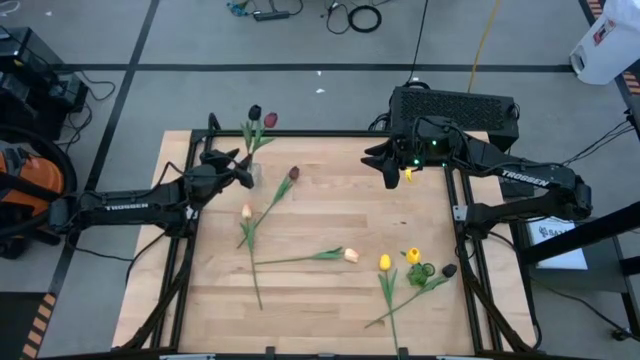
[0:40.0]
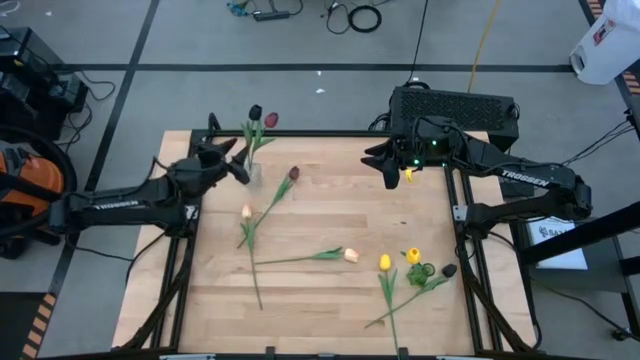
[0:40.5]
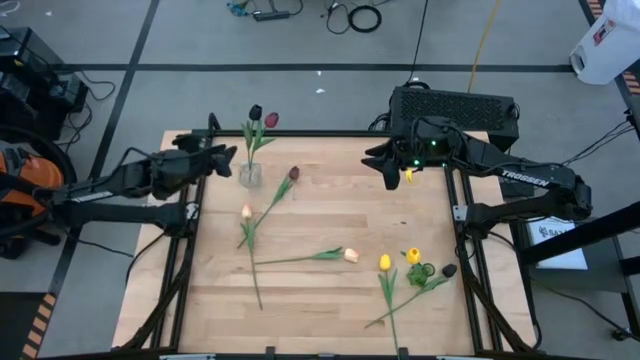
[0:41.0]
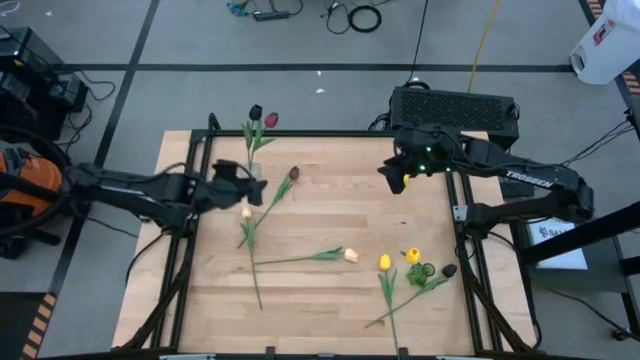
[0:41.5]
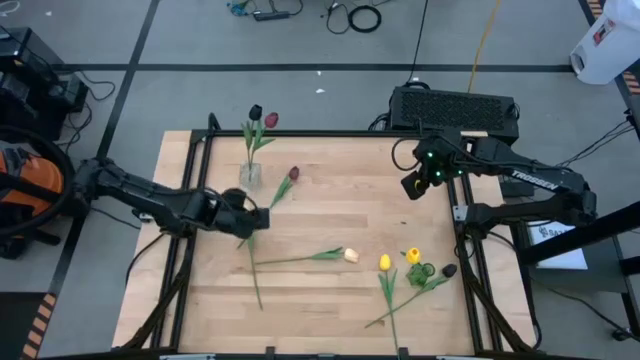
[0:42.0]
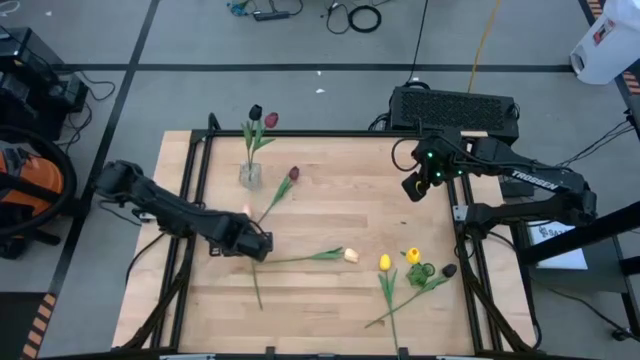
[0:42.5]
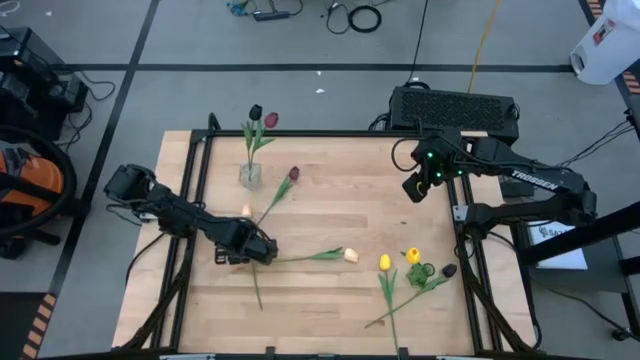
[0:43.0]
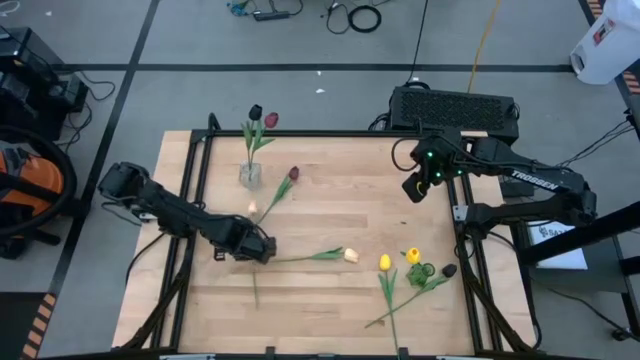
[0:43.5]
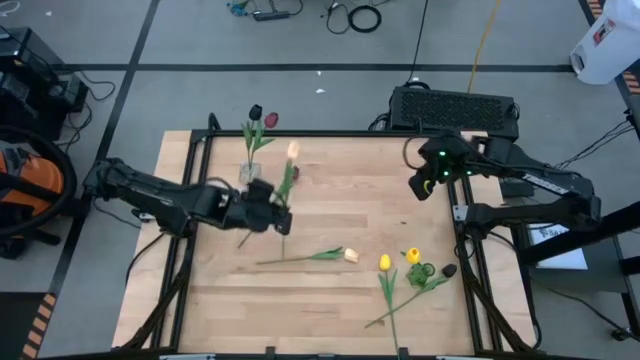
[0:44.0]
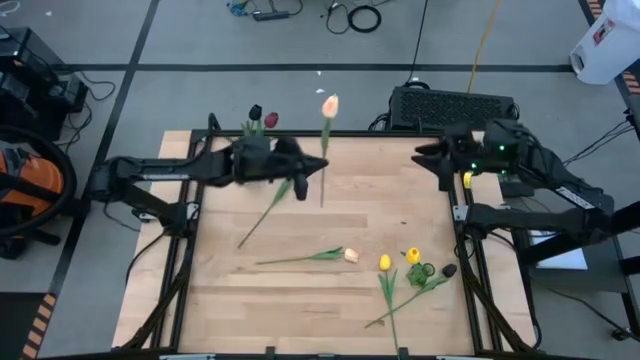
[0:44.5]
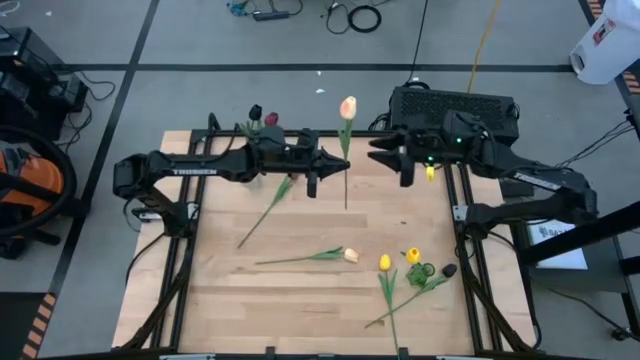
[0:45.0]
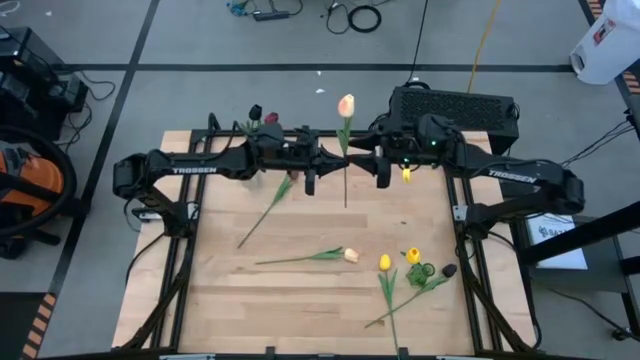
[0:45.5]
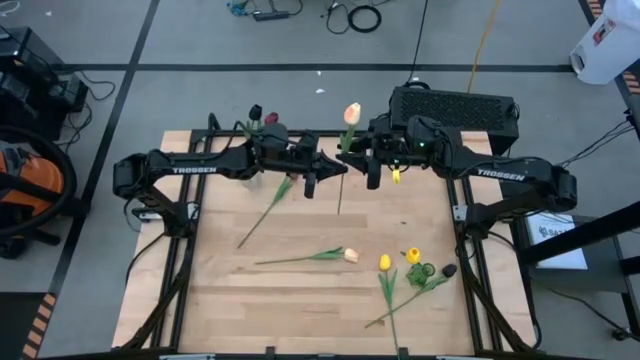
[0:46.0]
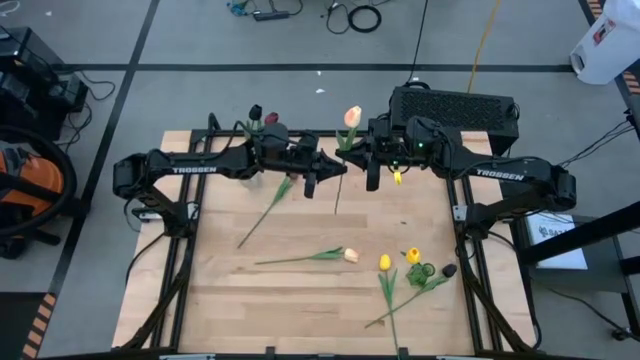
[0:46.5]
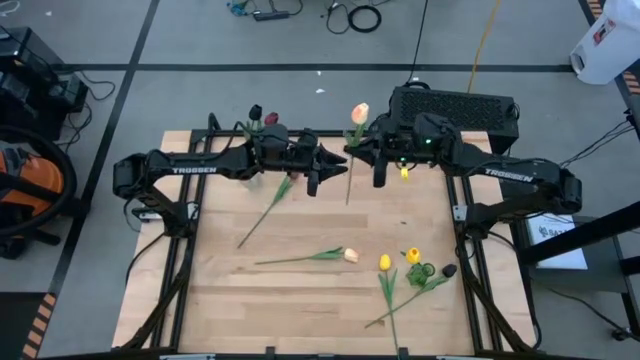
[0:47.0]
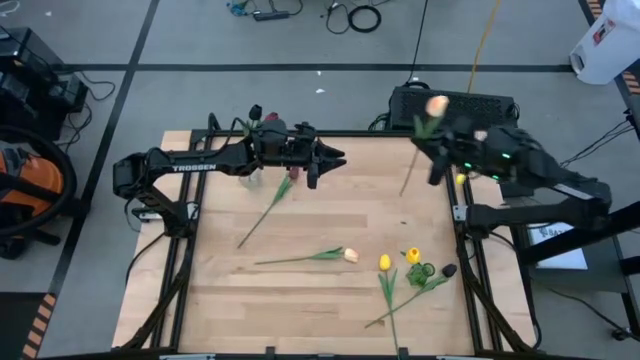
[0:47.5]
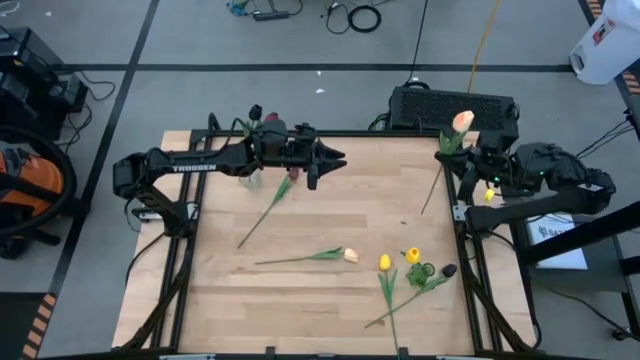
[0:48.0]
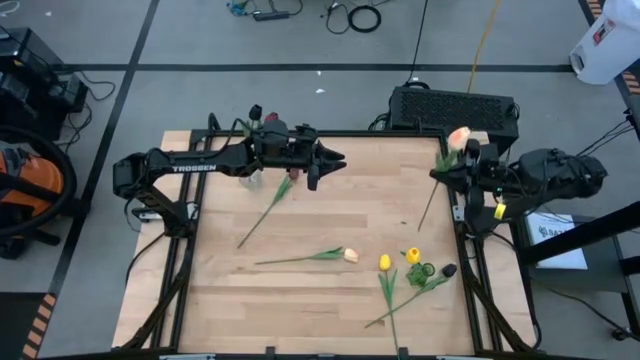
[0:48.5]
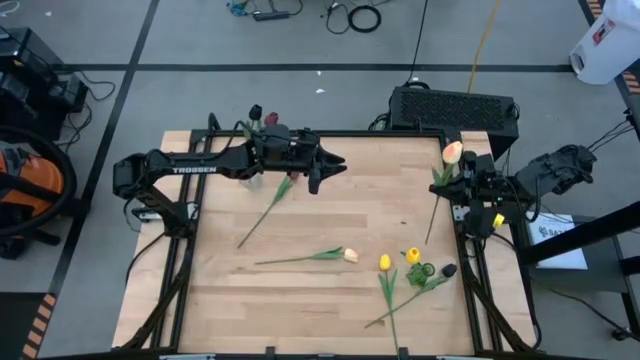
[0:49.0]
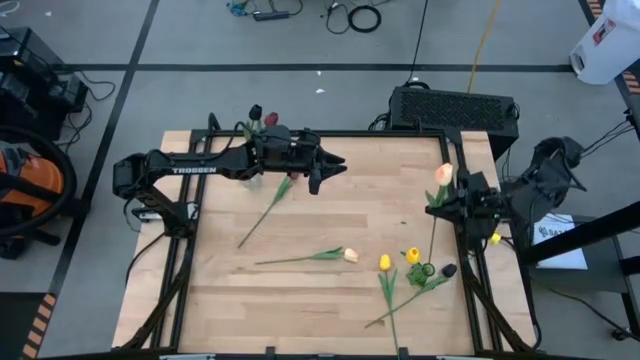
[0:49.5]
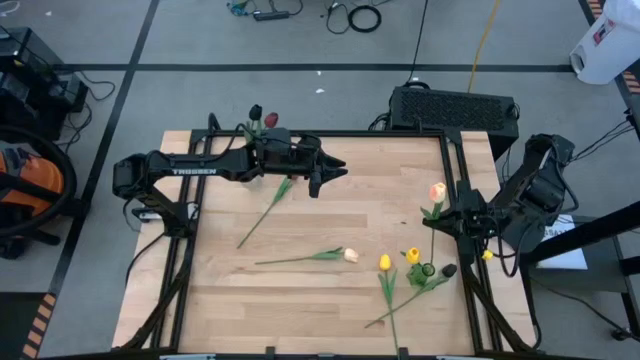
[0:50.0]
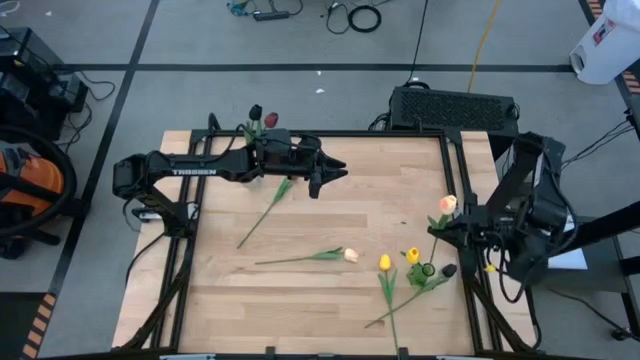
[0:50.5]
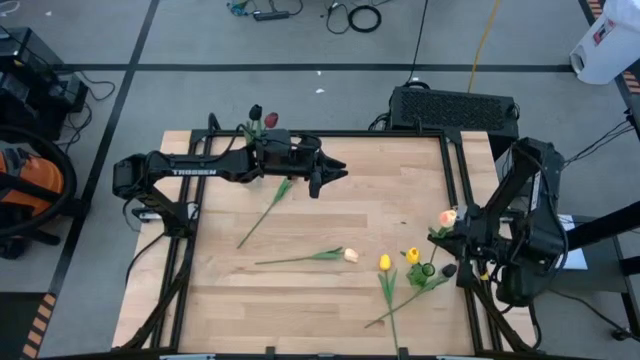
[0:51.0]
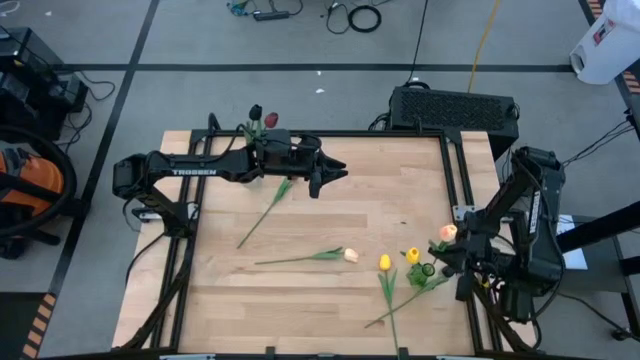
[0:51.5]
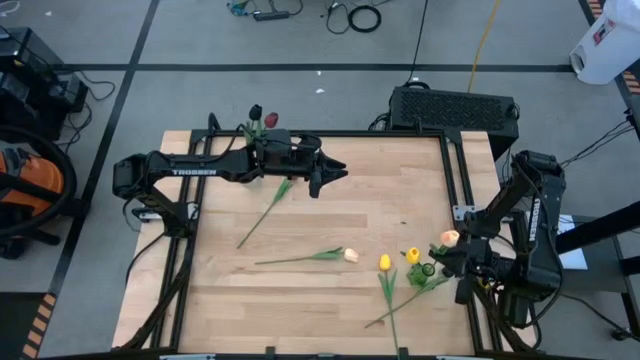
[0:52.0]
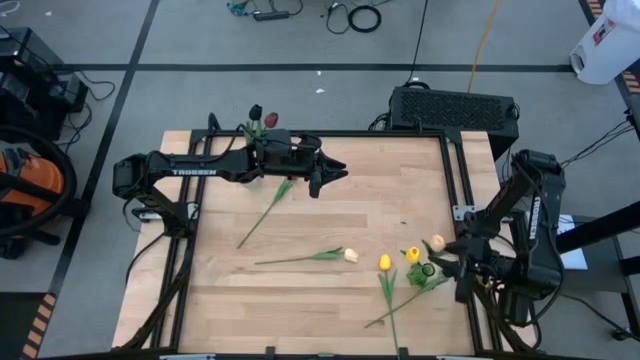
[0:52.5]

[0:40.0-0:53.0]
Task: Sort flowers into vase by color
Put the left white flower into the transparent green vase

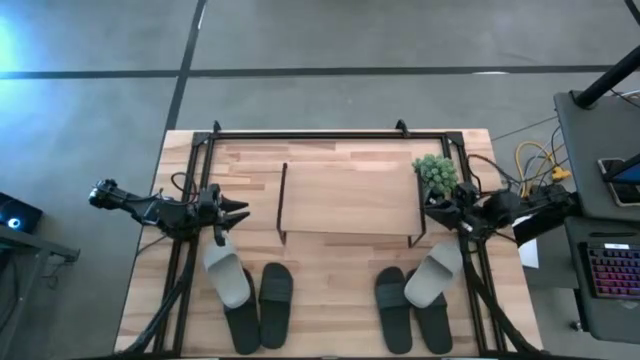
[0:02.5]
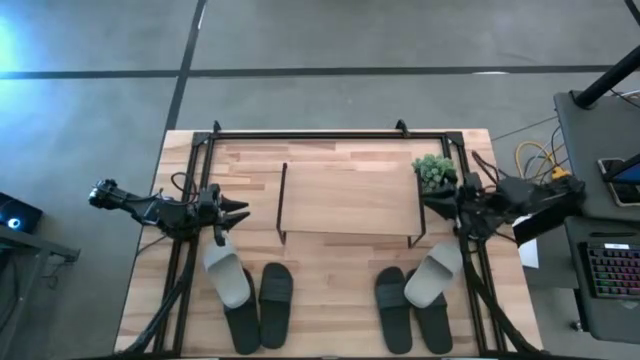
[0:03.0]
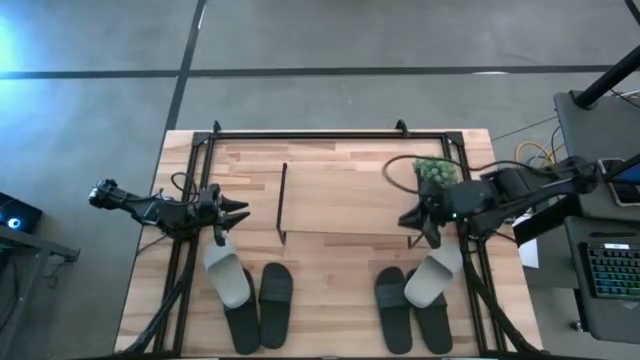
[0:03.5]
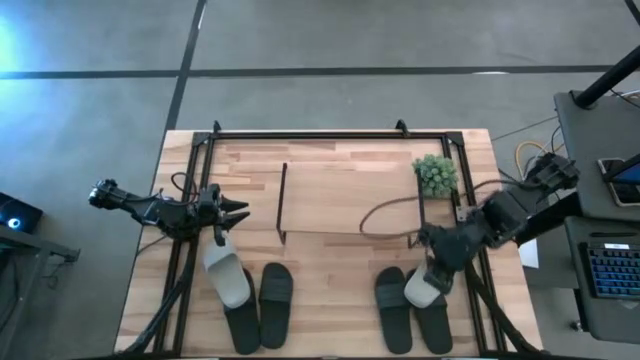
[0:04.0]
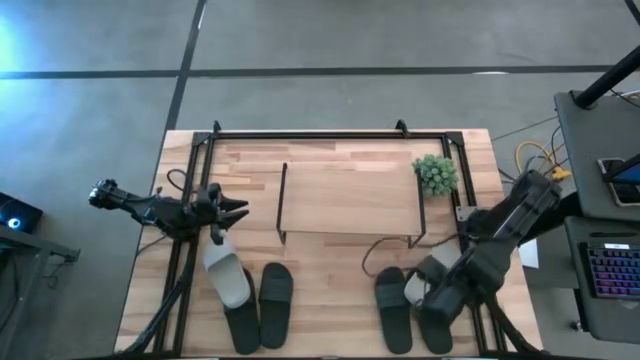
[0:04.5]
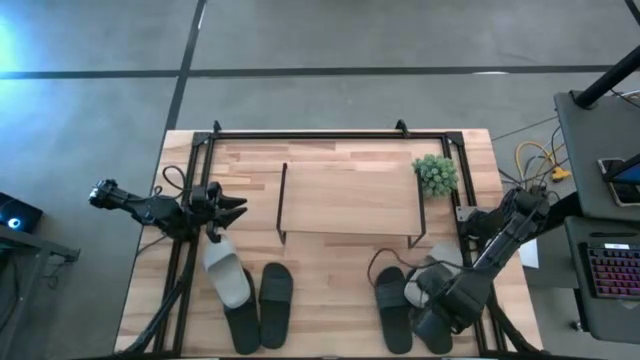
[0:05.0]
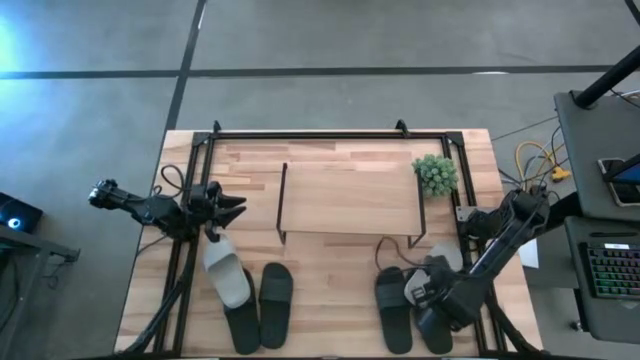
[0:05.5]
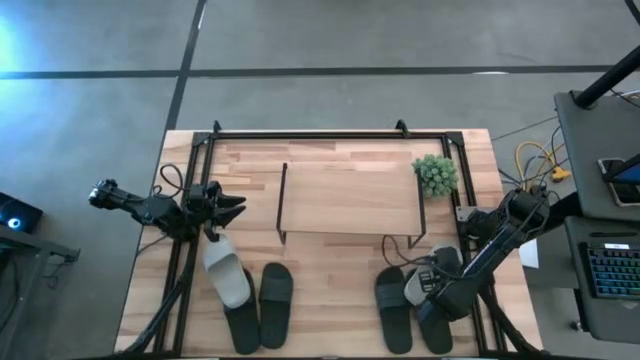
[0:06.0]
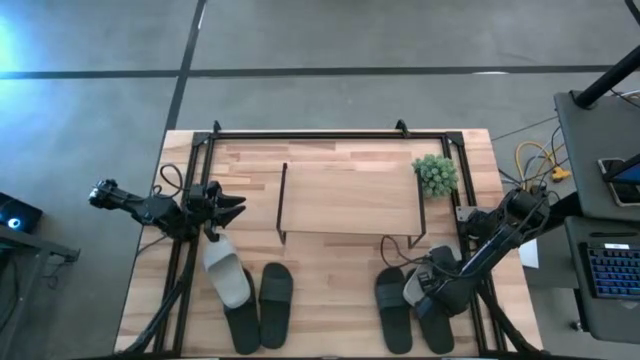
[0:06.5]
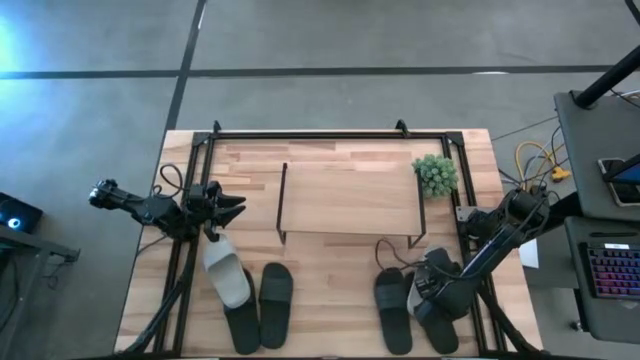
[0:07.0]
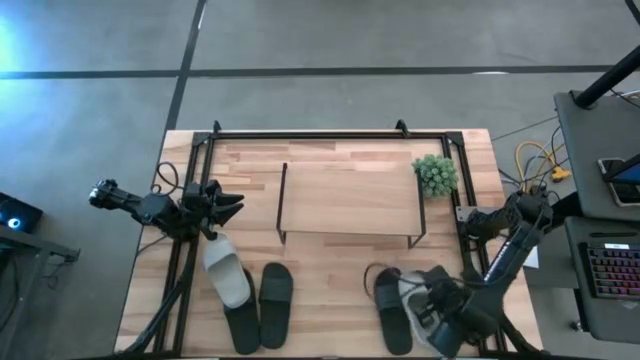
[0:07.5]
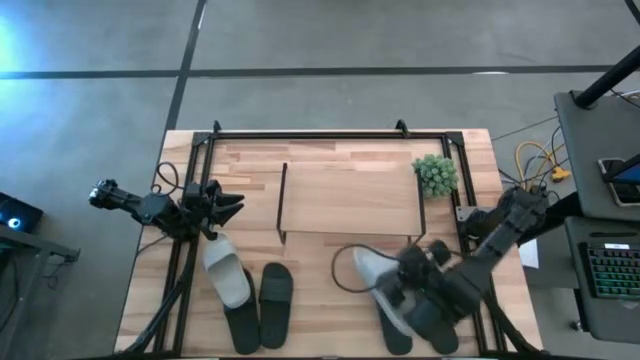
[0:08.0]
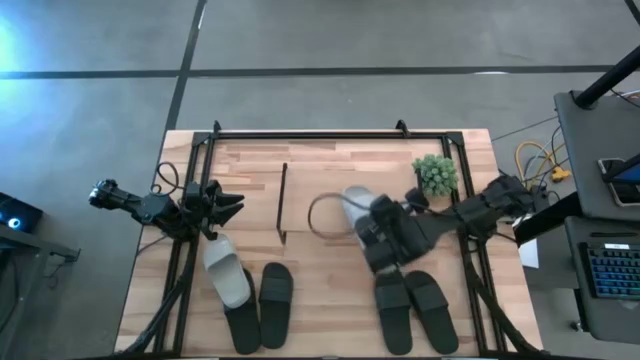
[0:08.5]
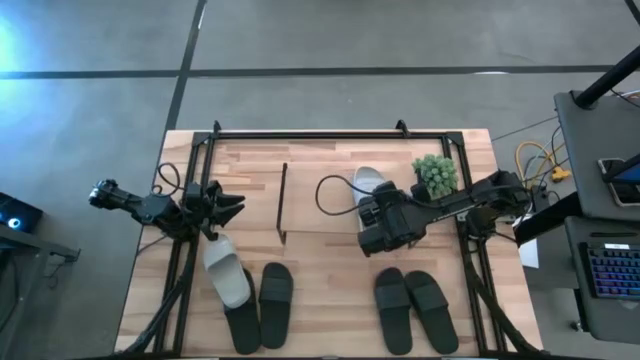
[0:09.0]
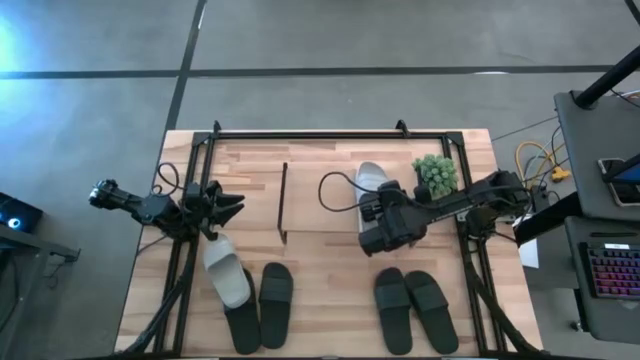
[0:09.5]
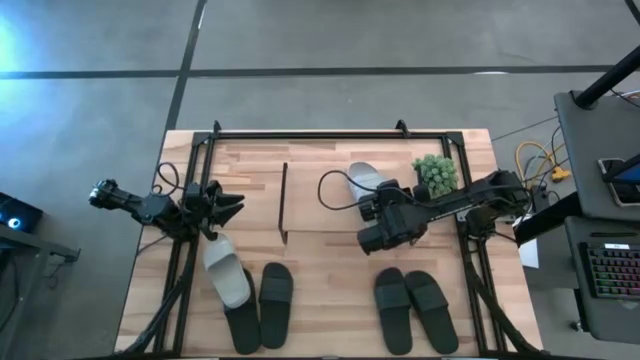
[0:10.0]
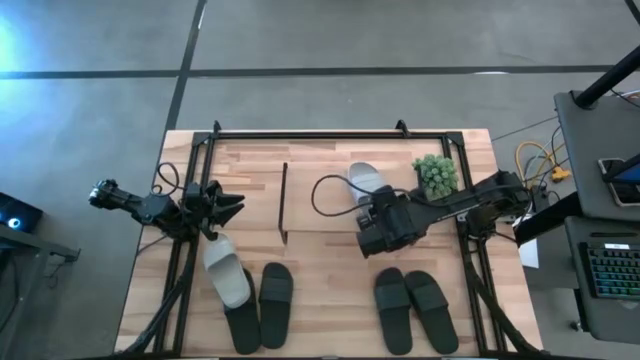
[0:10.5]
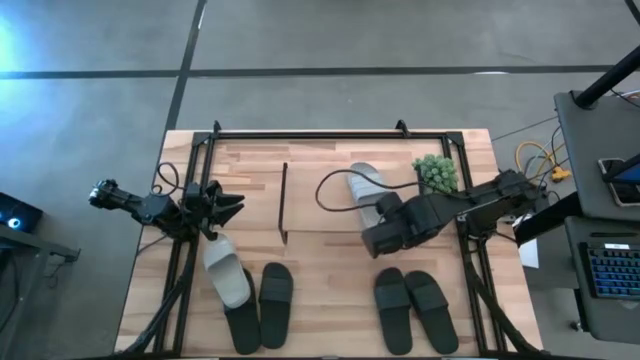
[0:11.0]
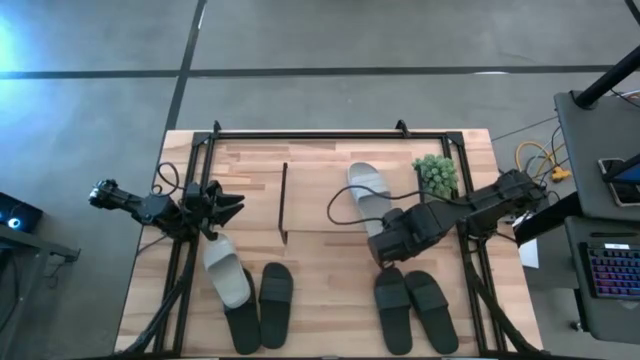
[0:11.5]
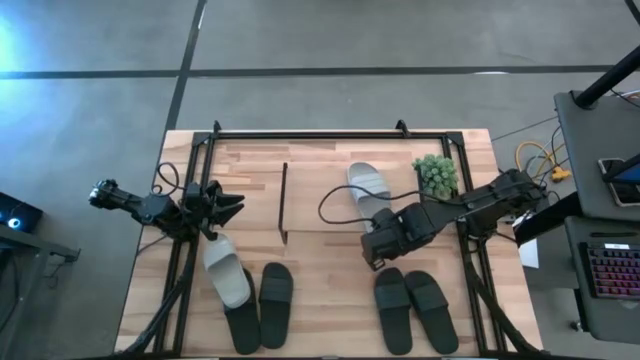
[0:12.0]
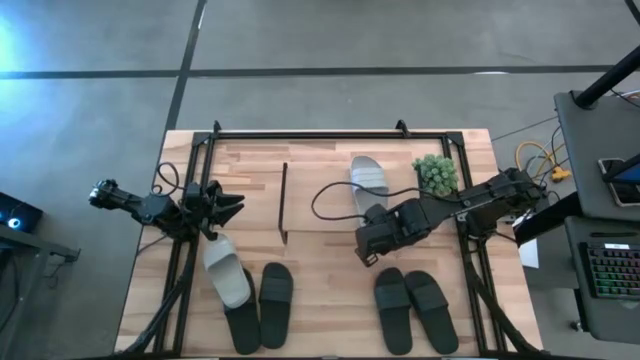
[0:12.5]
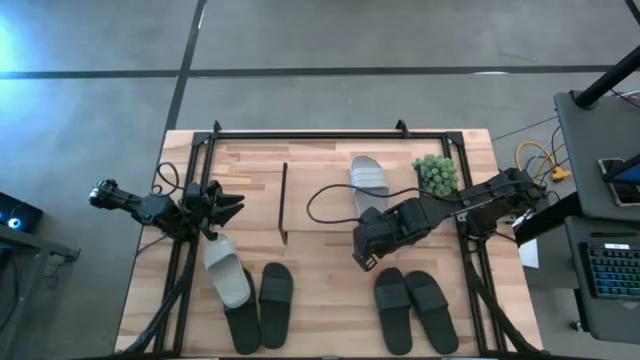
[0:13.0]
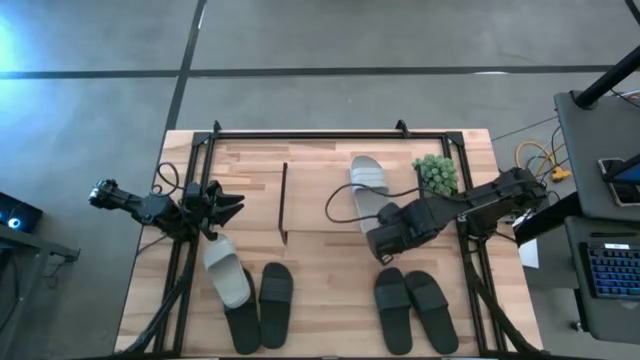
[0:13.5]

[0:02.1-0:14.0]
Task: Pick and place slides into the shelf
Put the right gray slide on the shelf
